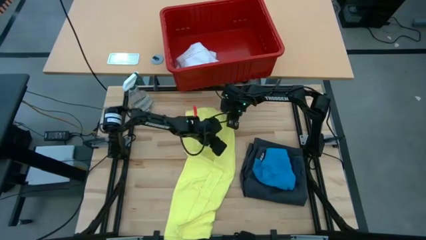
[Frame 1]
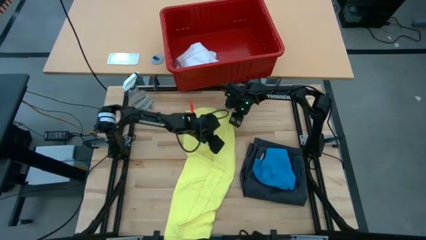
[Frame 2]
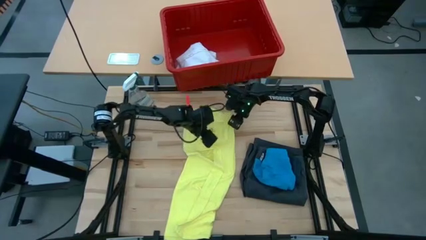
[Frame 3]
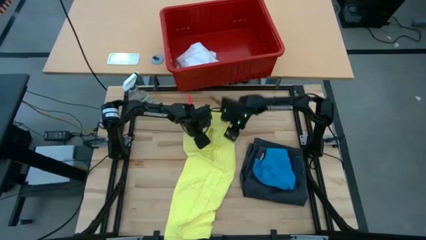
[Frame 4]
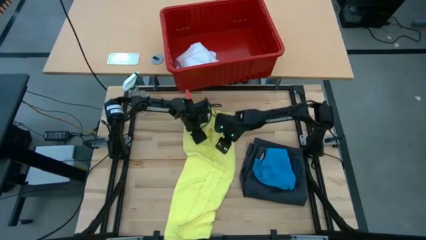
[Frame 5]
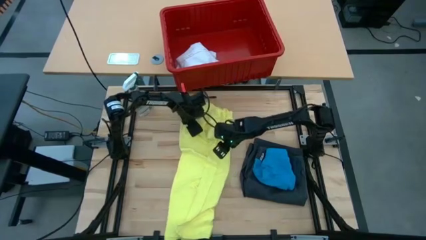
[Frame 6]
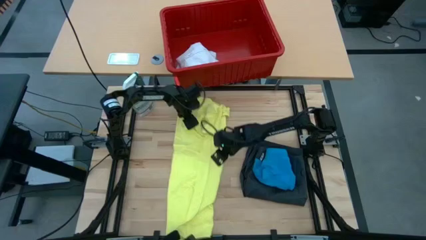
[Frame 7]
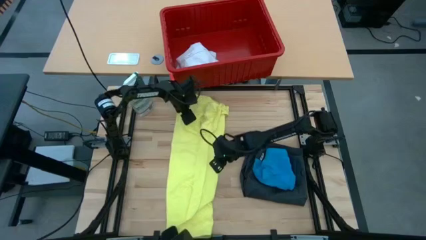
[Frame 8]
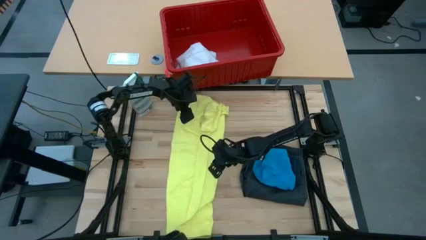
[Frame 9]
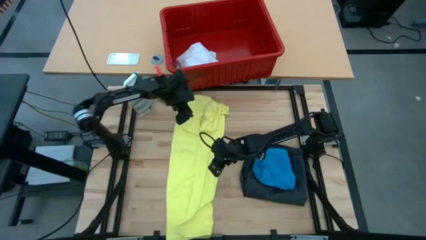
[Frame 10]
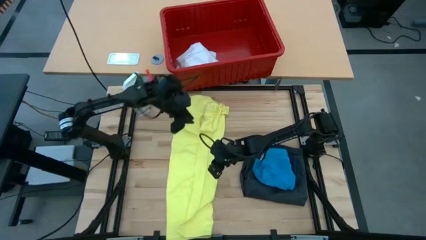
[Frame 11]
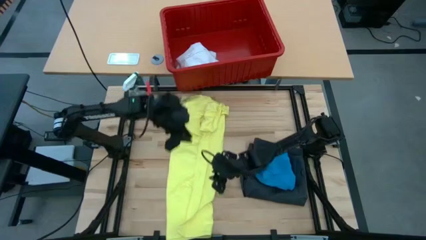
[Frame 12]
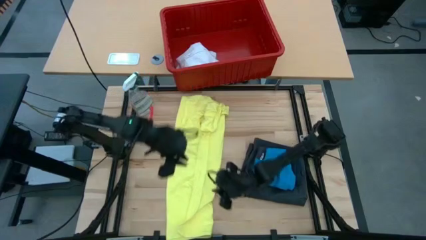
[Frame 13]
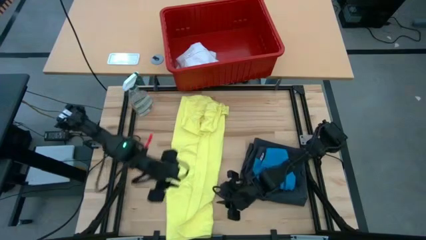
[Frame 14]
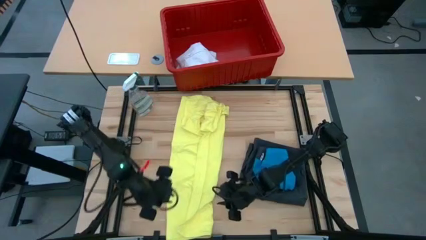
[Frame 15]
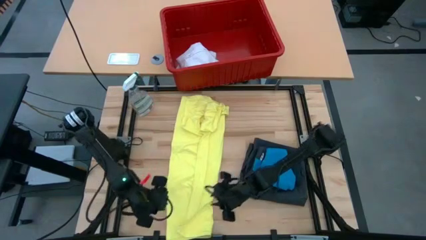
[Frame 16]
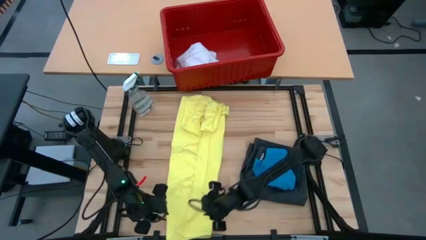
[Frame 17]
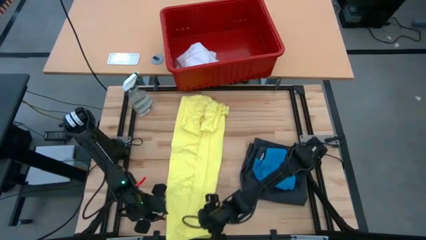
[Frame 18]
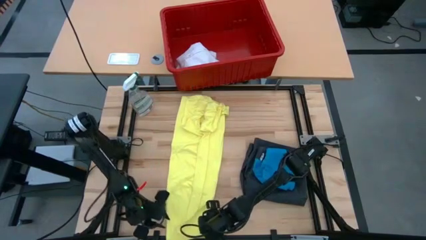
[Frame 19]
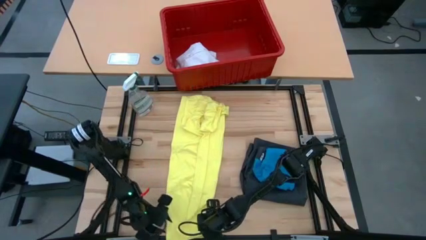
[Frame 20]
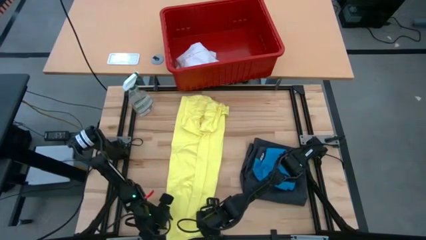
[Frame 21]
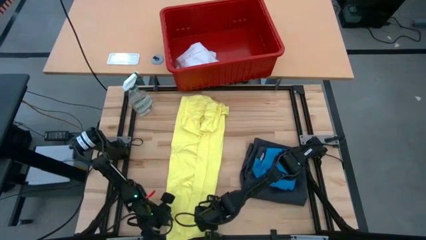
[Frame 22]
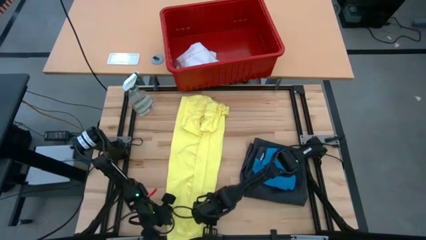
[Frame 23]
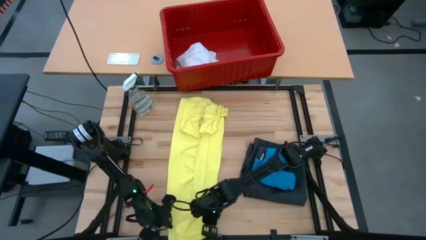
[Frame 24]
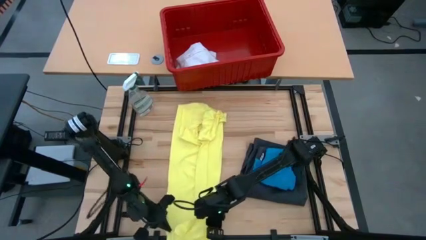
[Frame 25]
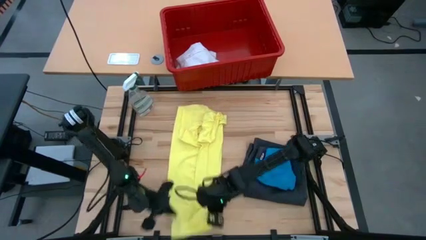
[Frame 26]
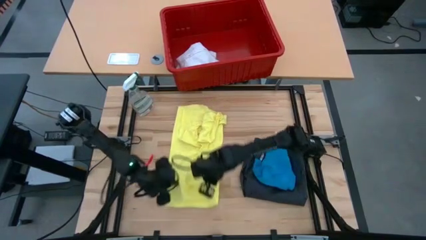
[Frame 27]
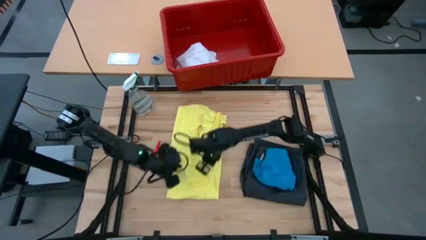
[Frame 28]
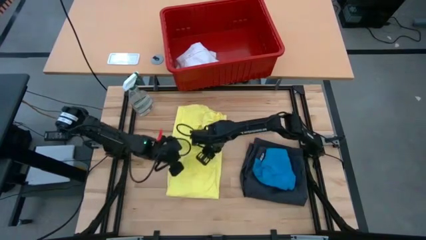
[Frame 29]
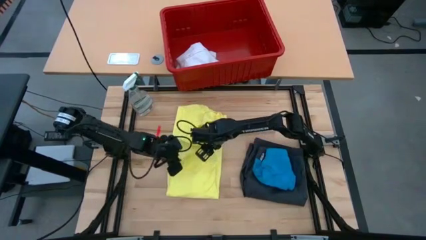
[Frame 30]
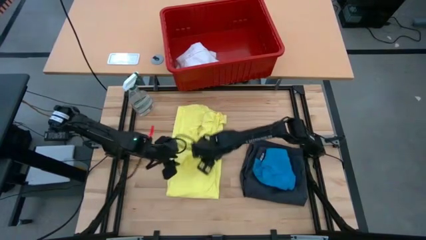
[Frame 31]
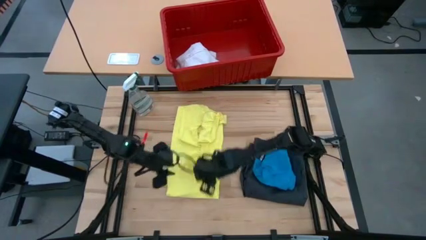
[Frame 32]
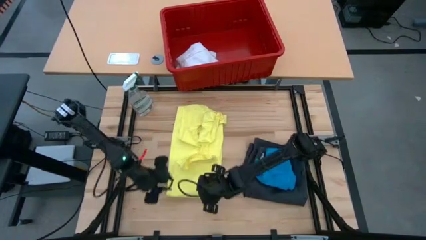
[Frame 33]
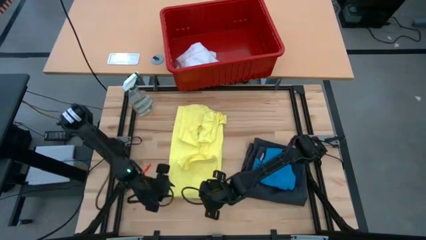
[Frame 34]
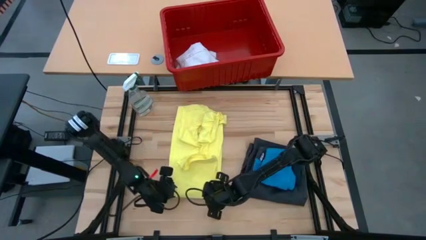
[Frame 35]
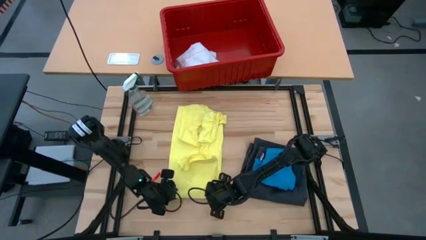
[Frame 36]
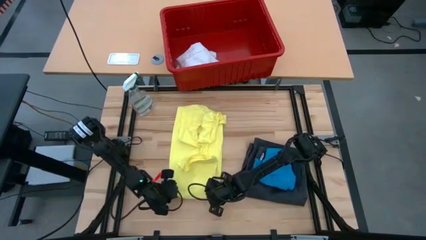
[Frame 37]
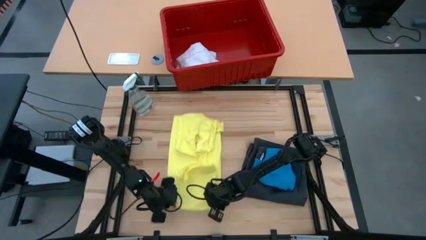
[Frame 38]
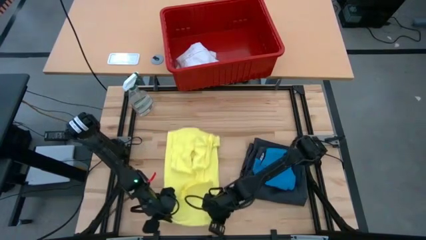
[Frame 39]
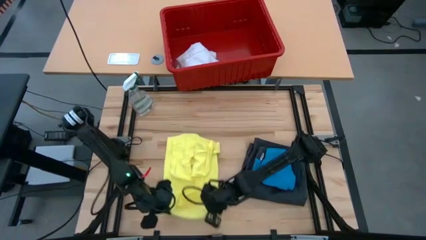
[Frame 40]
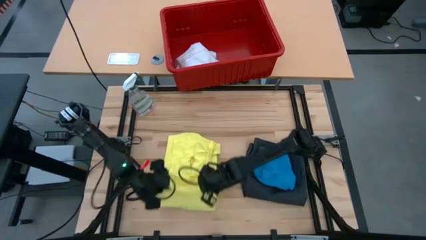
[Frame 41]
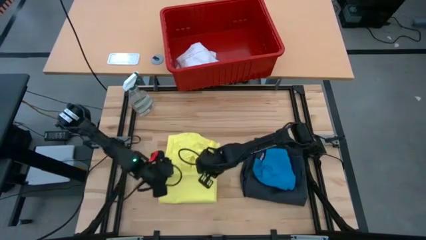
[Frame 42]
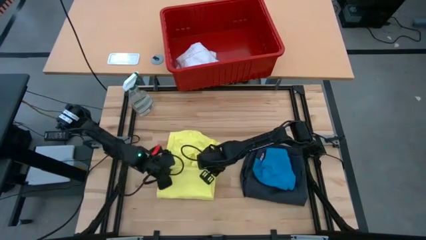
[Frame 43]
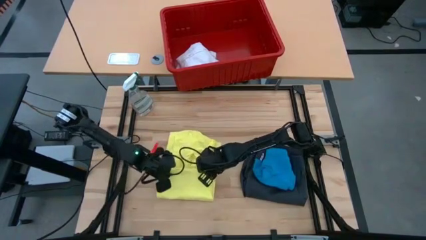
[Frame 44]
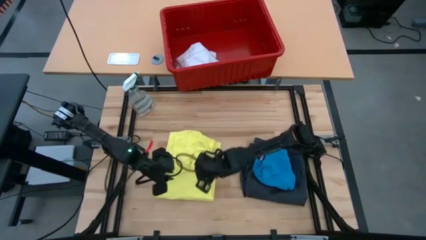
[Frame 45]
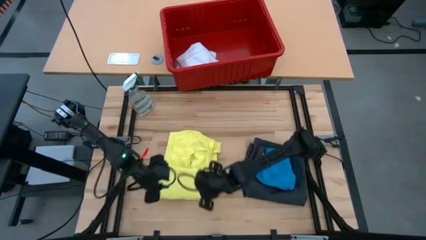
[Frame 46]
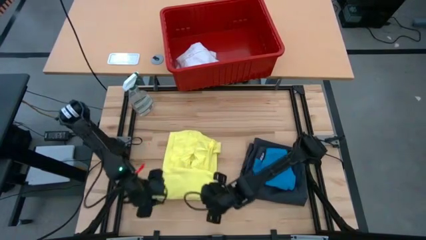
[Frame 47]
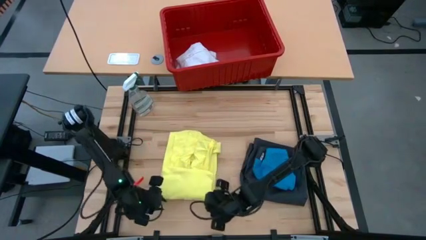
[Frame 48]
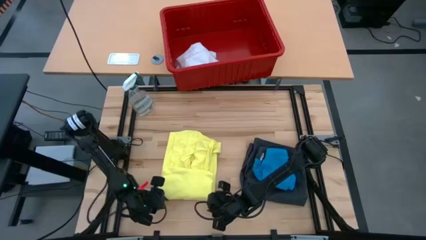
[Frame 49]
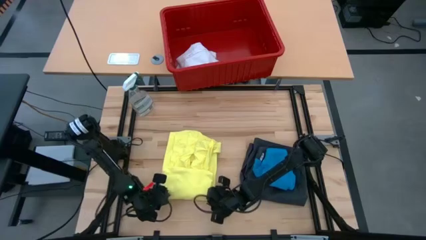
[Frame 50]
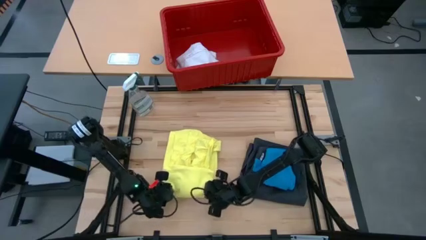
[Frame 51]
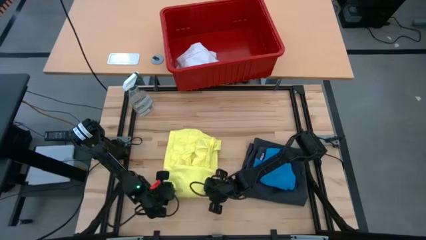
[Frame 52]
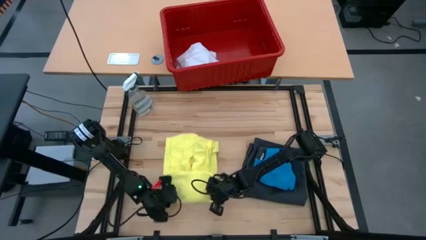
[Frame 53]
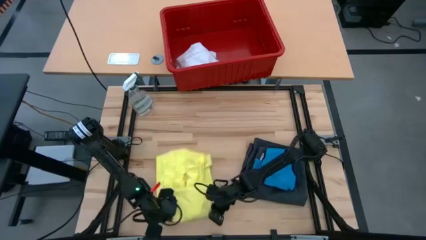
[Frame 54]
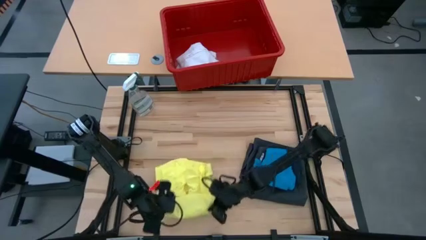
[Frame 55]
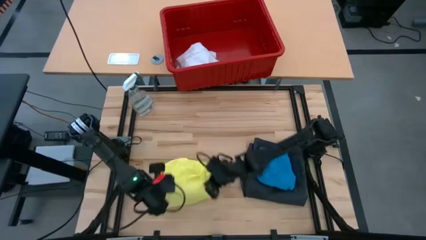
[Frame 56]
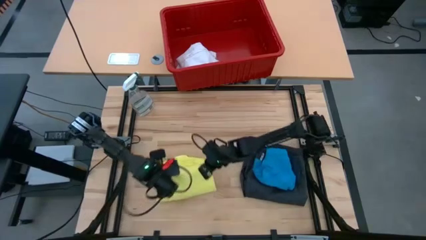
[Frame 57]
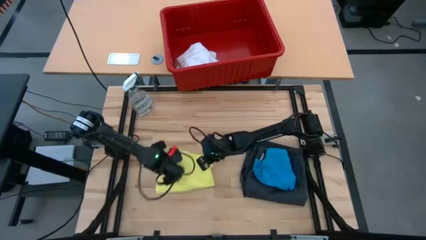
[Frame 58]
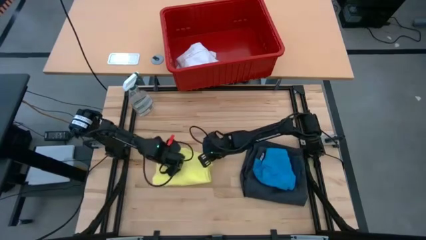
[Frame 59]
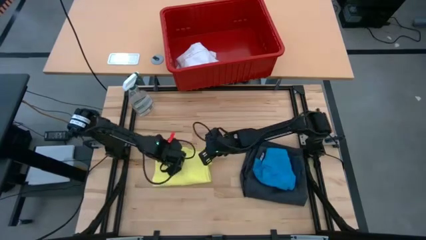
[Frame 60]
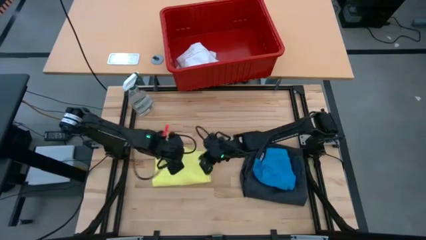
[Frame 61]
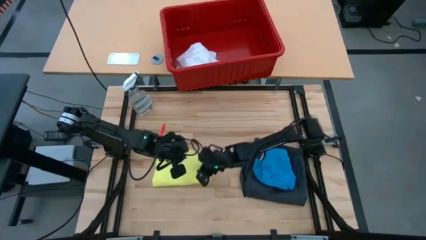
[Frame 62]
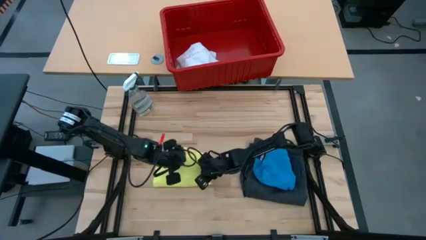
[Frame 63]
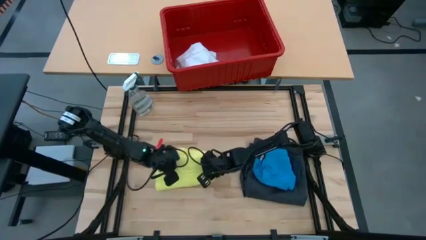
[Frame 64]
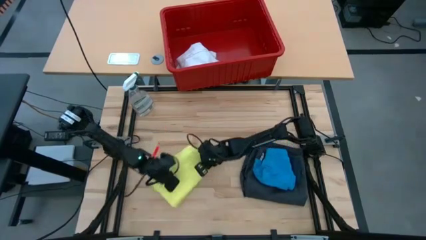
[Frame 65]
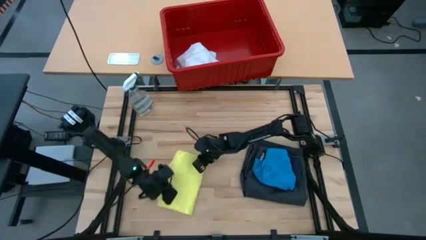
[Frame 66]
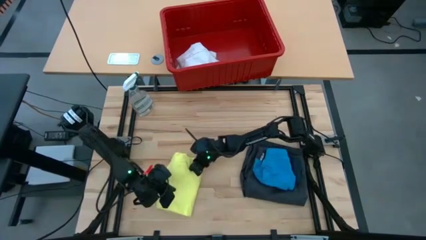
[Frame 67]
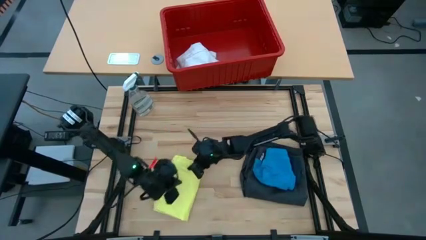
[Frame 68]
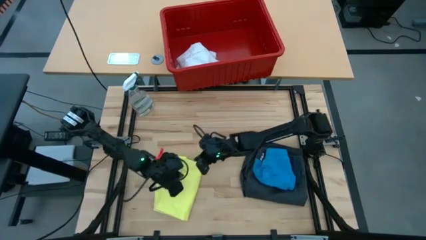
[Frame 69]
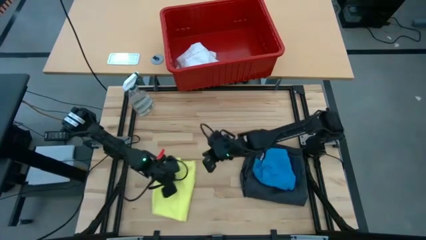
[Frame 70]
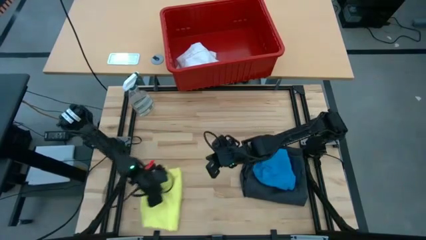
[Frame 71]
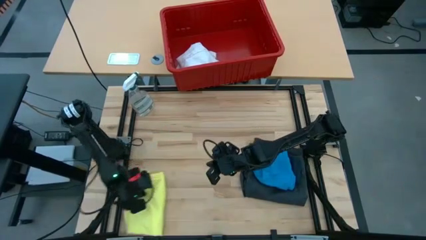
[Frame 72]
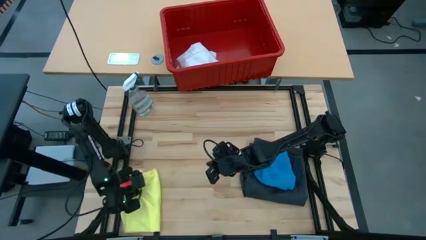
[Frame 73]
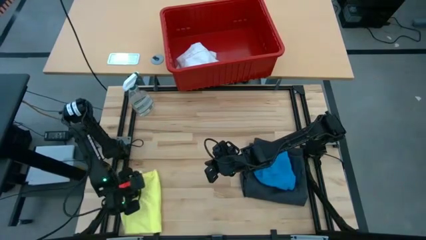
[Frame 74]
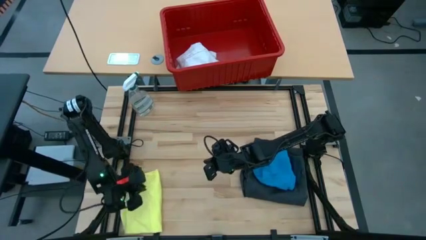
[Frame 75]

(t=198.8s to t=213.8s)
Task: Fold laundry
Fold the yellow shirt
